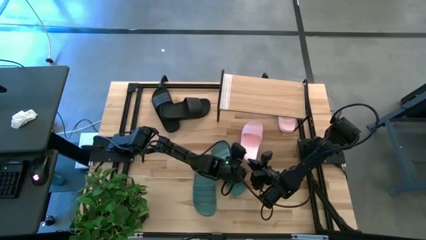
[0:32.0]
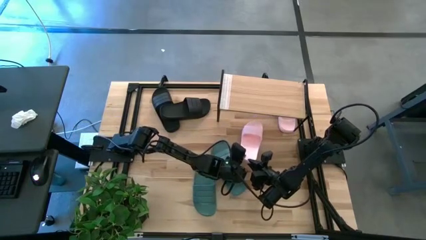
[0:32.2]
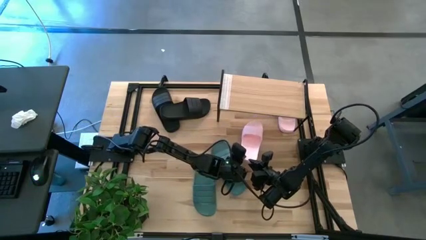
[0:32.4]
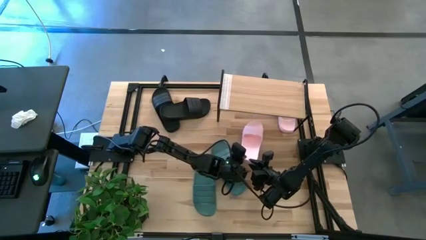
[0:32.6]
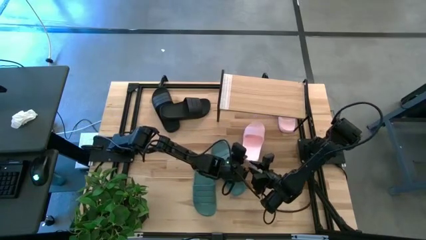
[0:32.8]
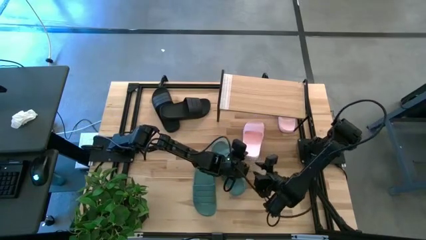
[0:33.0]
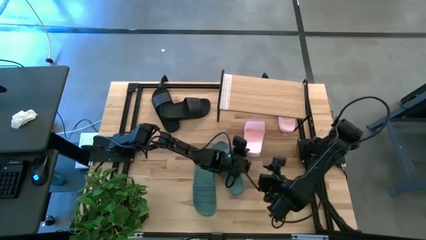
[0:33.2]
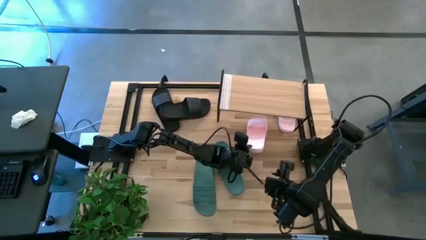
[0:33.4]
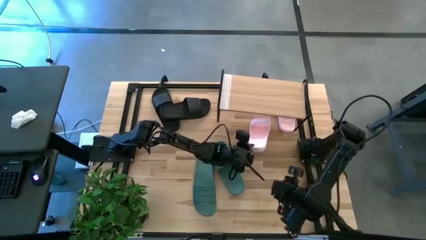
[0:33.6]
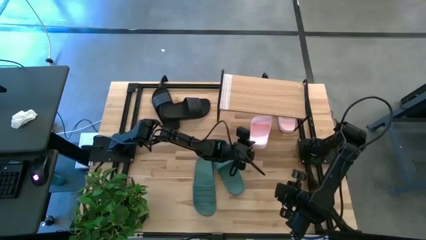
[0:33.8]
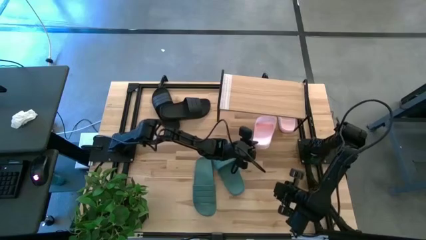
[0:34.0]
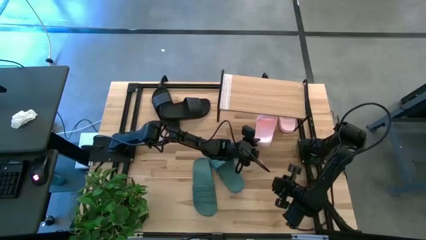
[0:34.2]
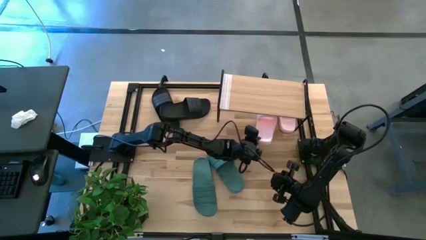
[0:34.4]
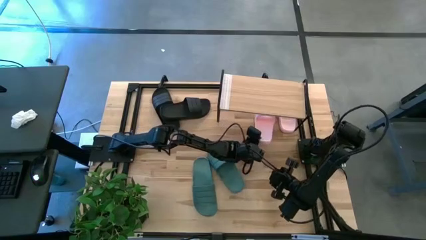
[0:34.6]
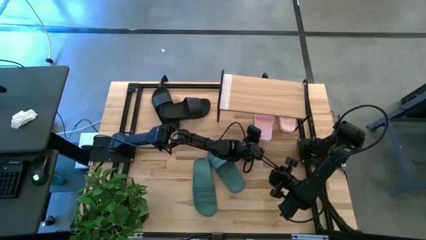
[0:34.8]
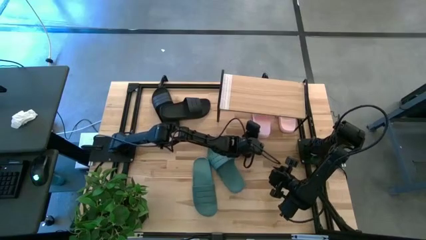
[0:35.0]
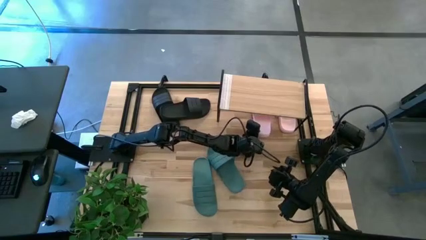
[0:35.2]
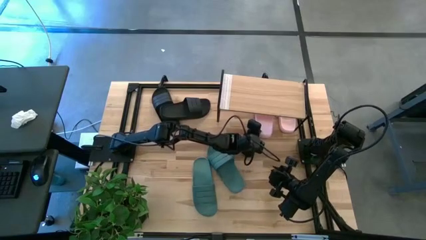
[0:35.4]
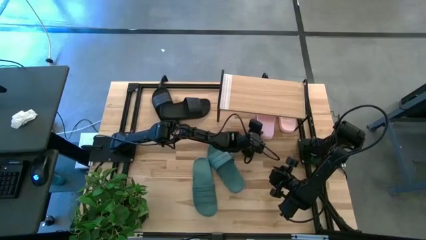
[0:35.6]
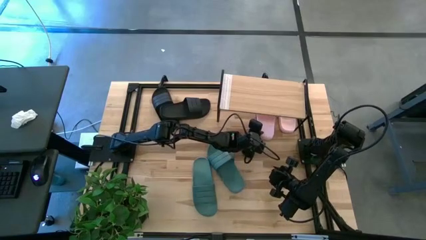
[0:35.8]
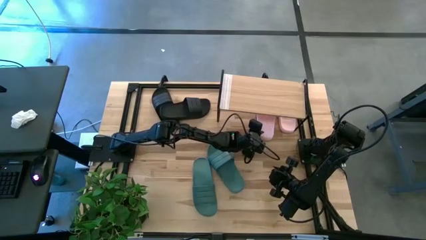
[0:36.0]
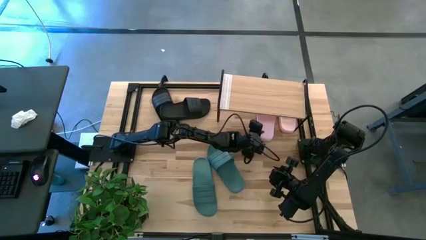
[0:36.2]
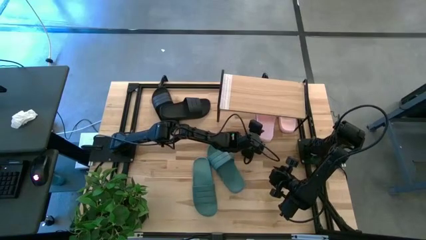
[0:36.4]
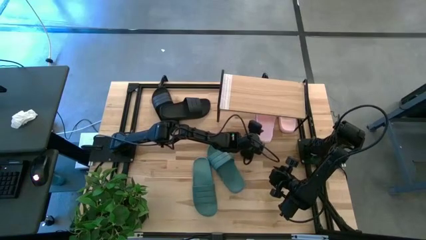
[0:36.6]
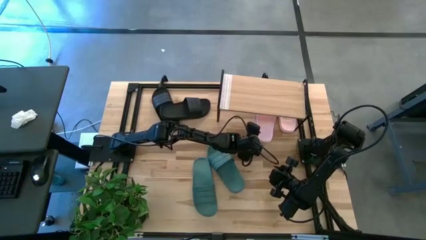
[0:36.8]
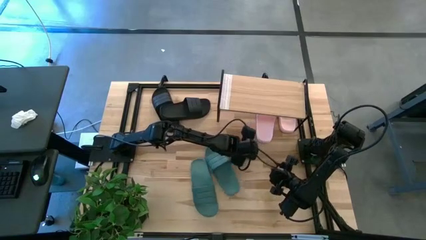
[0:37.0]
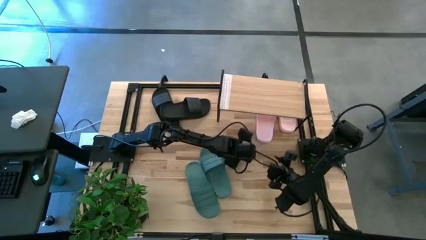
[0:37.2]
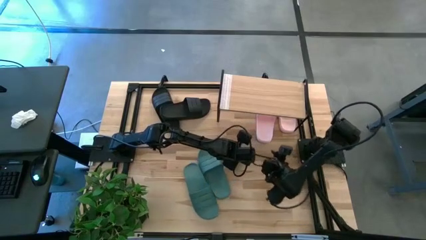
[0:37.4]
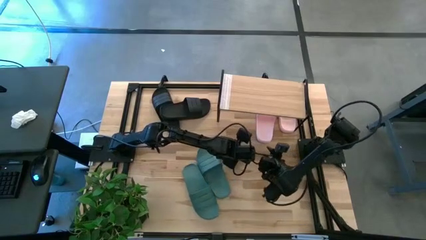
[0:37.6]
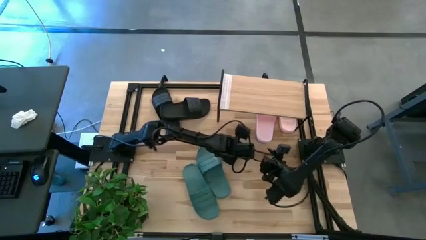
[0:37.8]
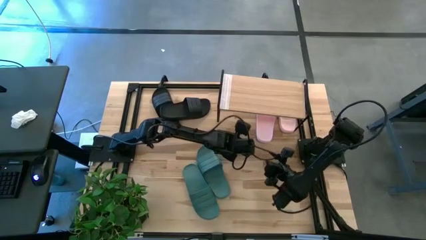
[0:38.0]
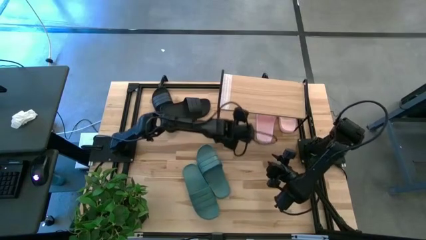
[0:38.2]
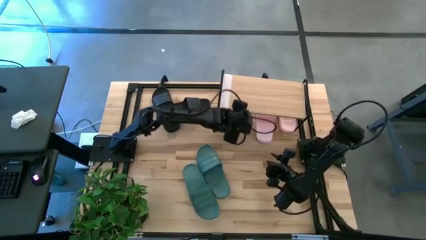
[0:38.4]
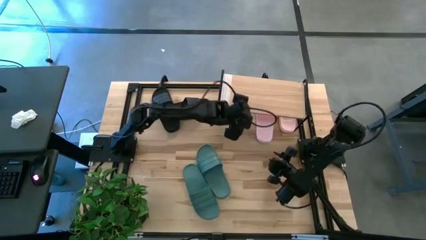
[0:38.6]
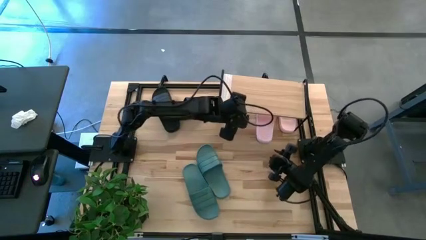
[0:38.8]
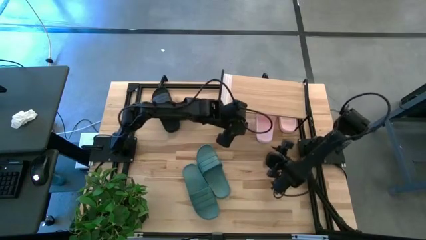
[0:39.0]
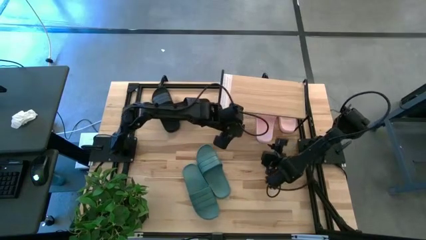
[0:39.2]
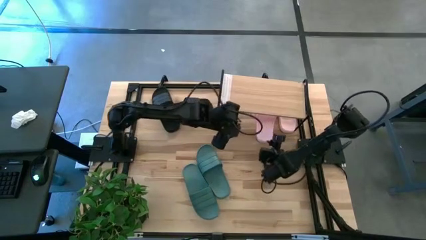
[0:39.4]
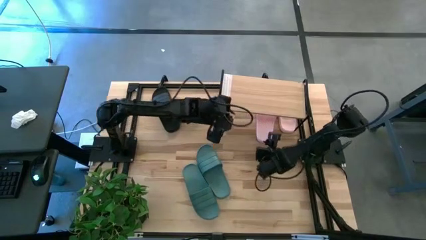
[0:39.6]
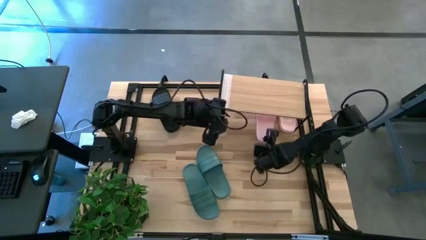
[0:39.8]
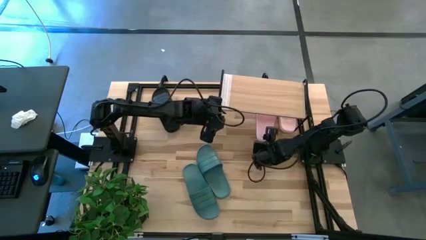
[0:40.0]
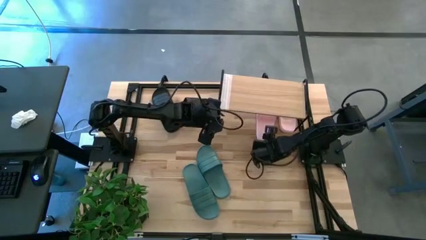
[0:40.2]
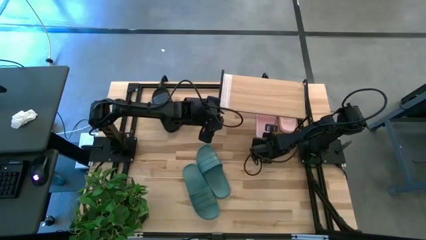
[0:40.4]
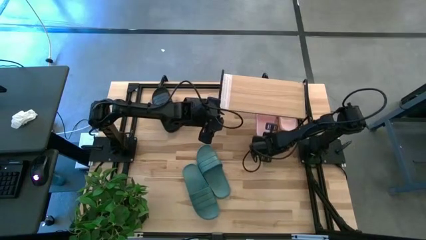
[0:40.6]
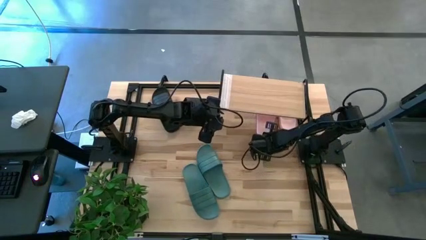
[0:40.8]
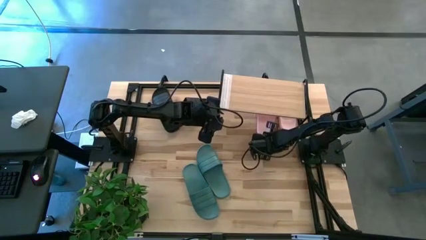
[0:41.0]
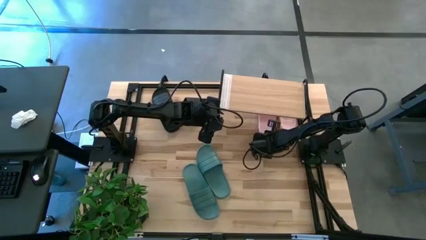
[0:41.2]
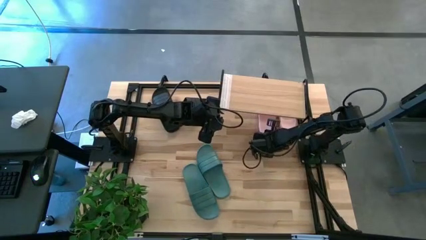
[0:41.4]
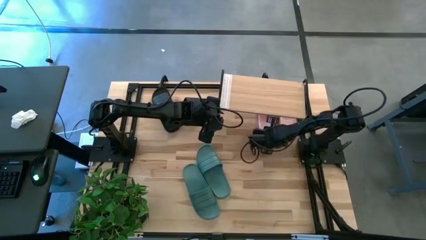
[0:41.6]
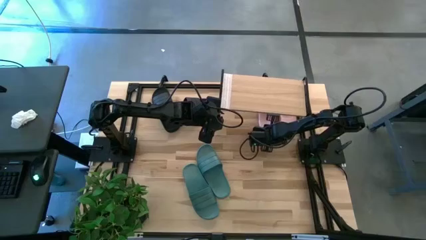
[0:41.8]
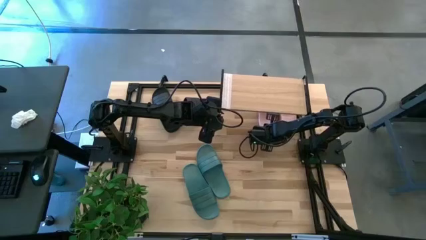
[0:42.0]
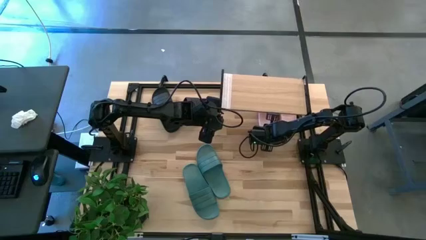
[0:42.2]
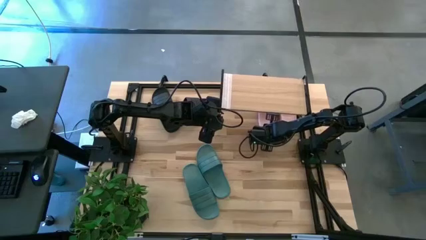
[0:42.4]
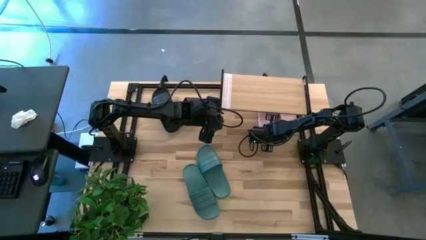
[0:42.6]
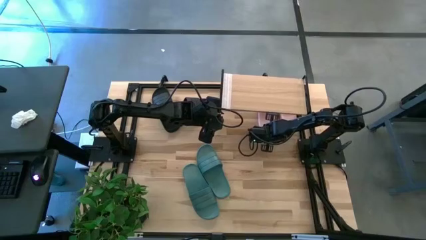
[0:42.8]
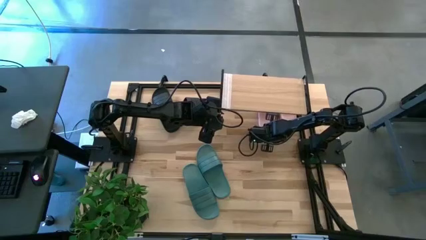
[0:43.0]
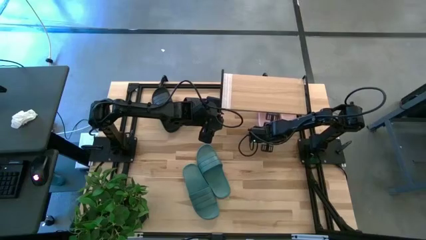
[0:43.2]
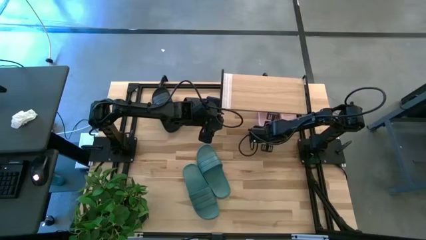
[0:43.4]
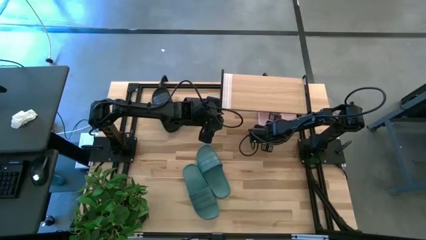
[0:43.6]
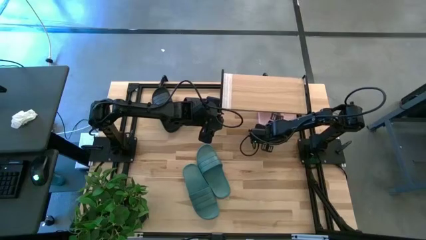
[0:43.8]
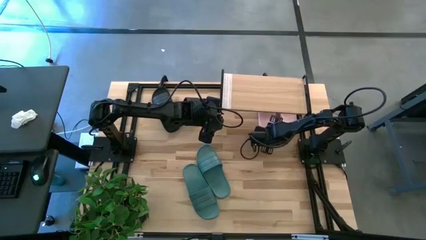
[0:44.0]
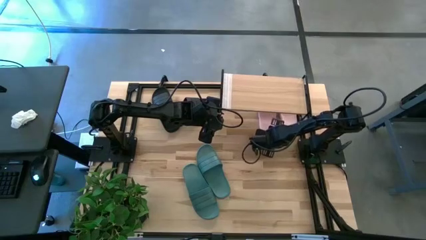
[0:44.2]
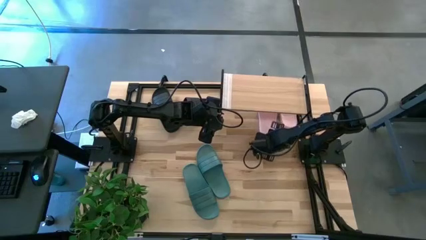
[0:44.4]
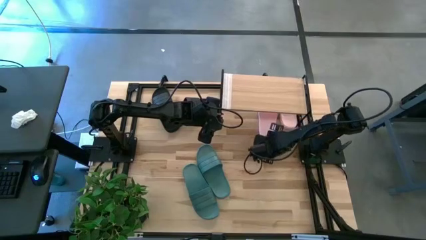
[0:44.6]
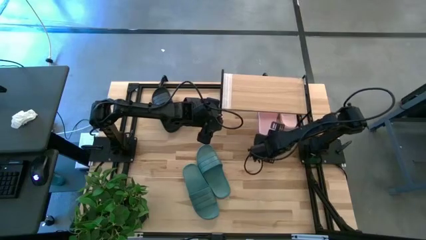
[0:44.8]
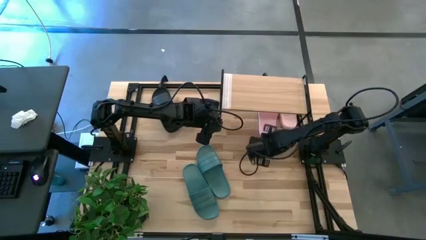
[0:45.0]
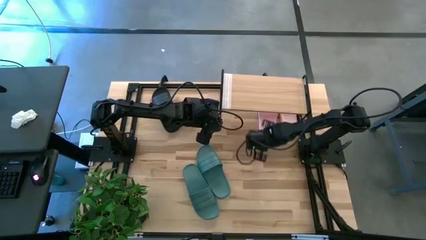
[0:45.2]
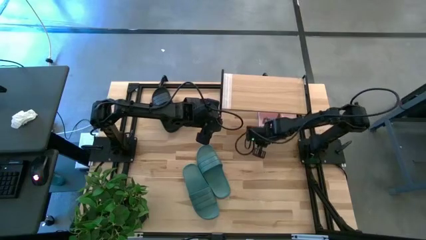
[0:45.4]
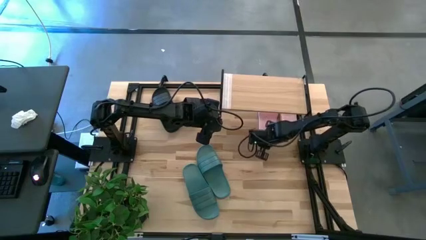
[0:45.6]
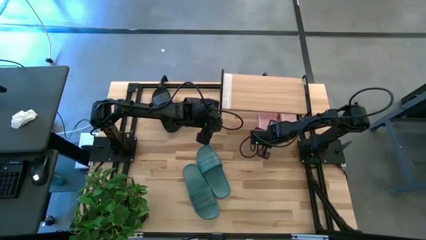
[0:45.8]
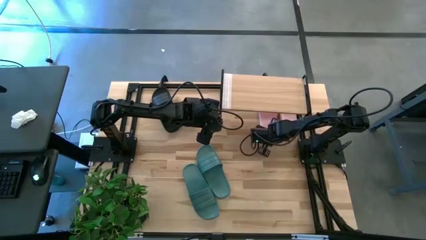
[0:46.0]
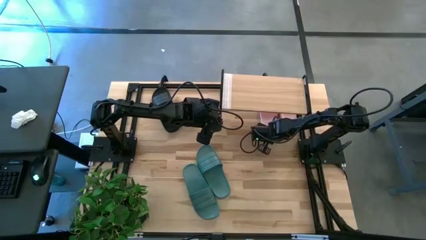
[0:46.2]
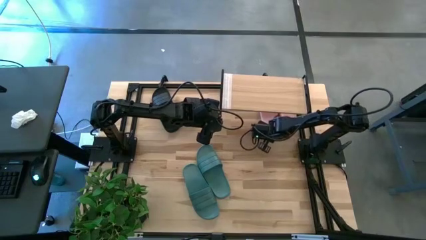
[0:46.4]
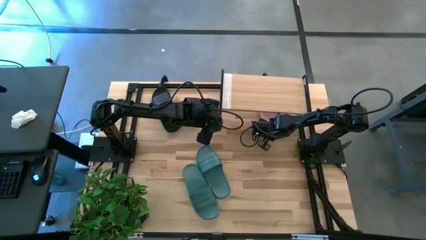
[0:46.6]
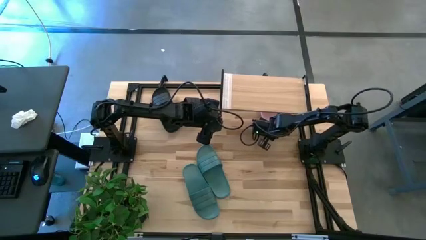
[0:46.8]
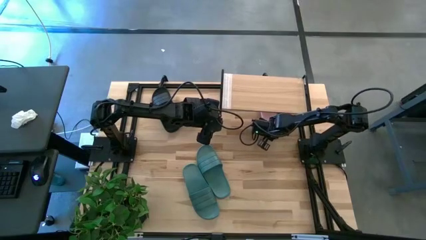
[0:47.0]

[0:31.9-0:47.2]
Task: Pick and place slides into the shelf
Put the left pink slides under the shelf
